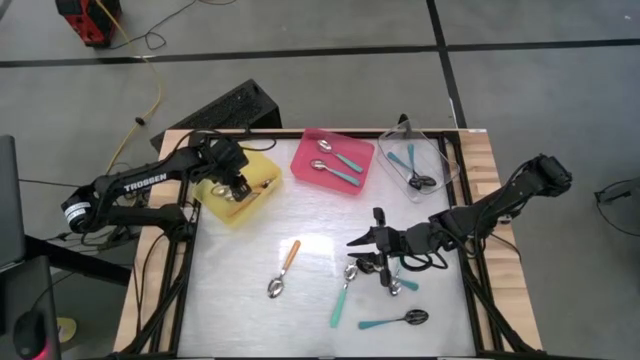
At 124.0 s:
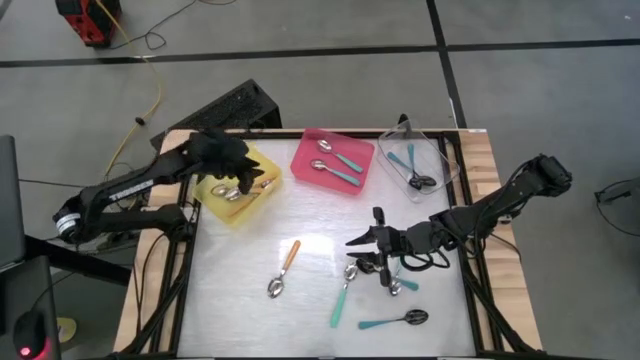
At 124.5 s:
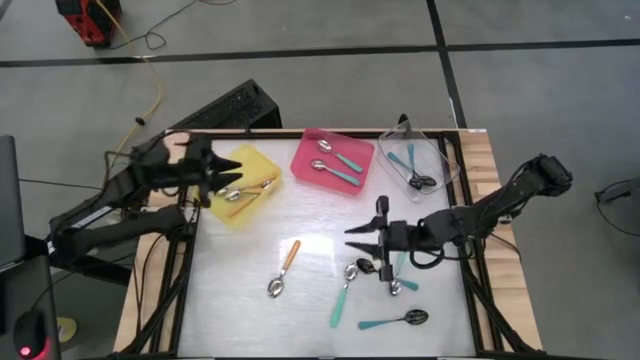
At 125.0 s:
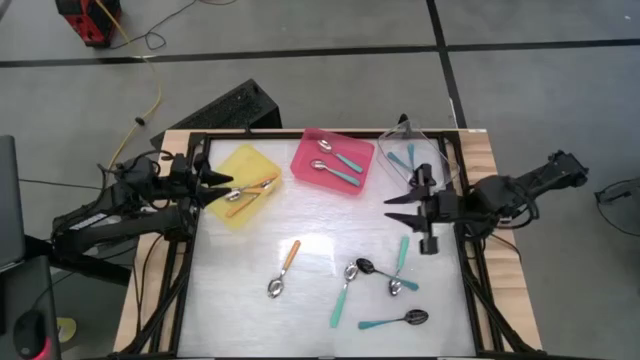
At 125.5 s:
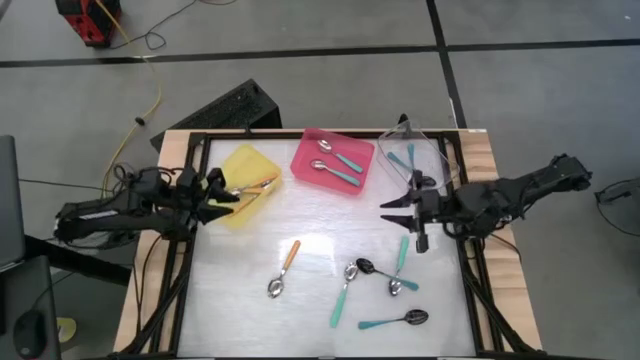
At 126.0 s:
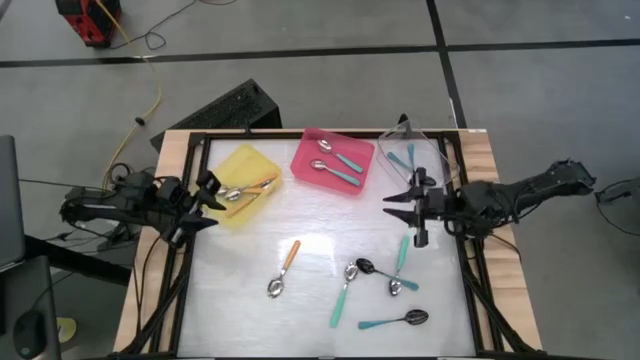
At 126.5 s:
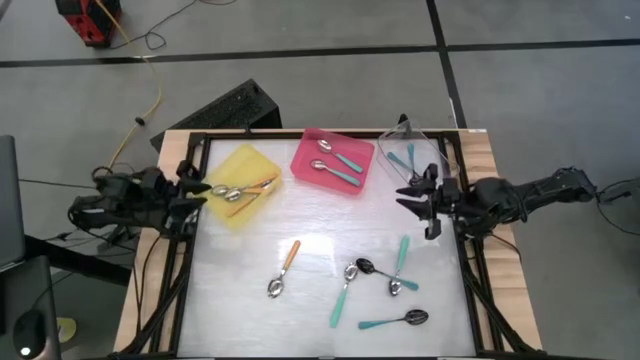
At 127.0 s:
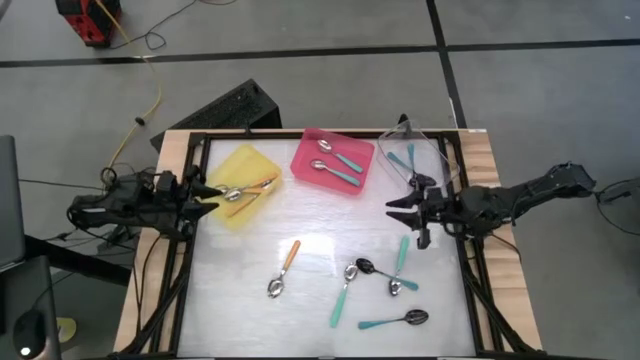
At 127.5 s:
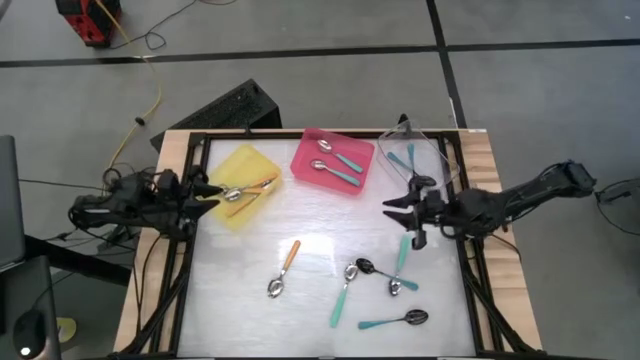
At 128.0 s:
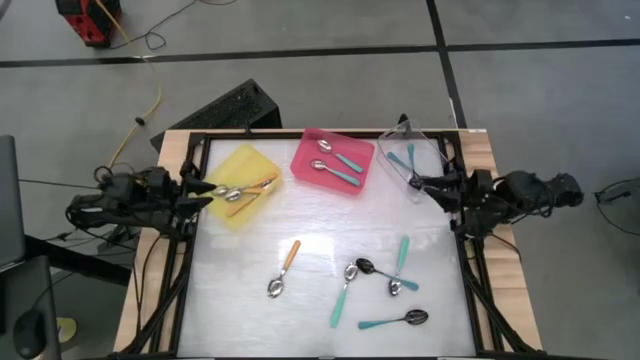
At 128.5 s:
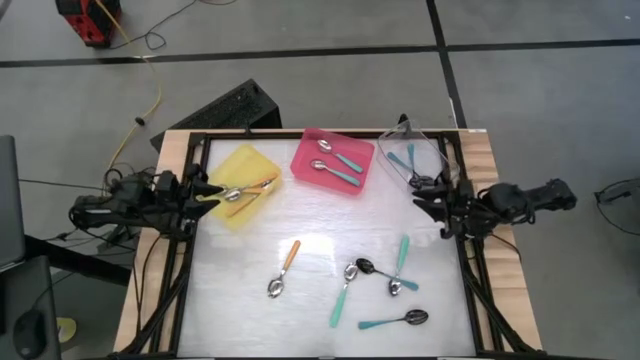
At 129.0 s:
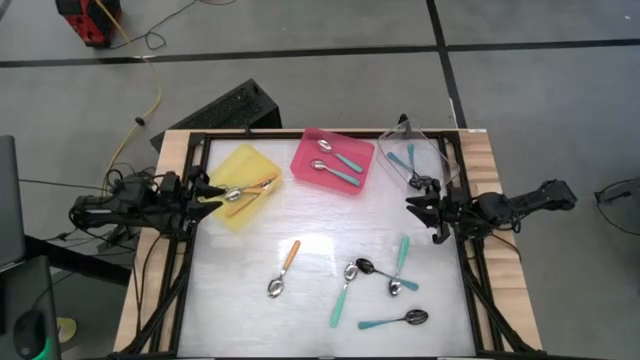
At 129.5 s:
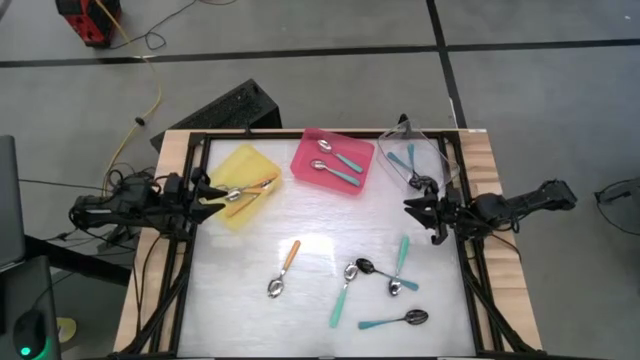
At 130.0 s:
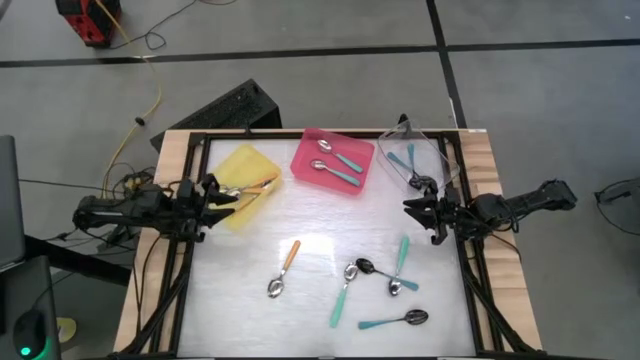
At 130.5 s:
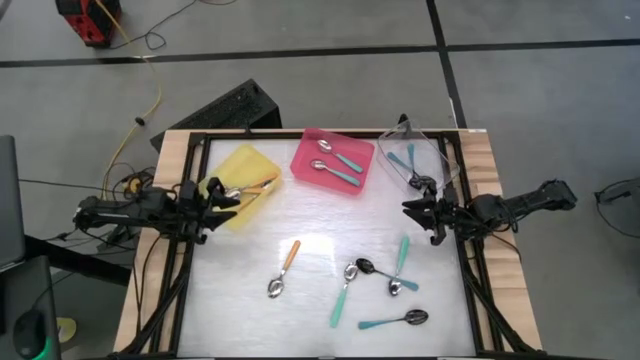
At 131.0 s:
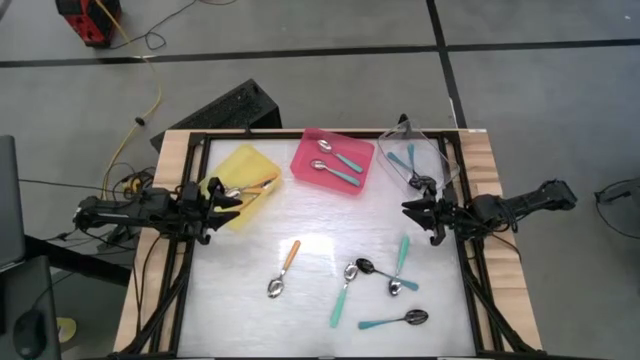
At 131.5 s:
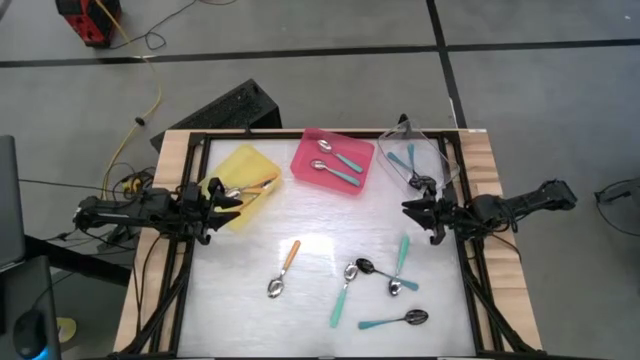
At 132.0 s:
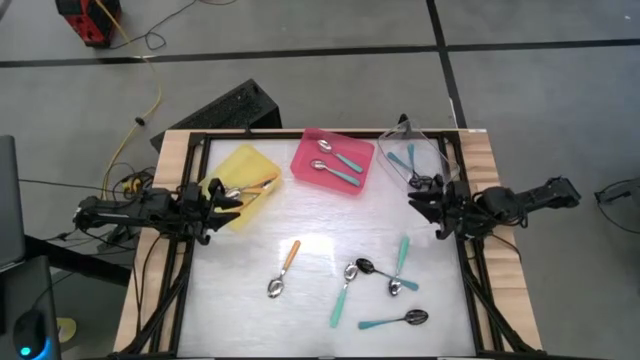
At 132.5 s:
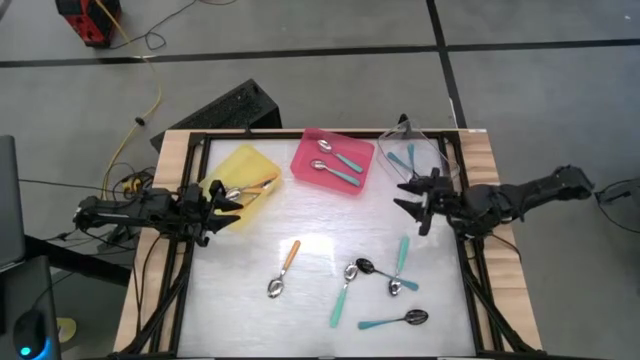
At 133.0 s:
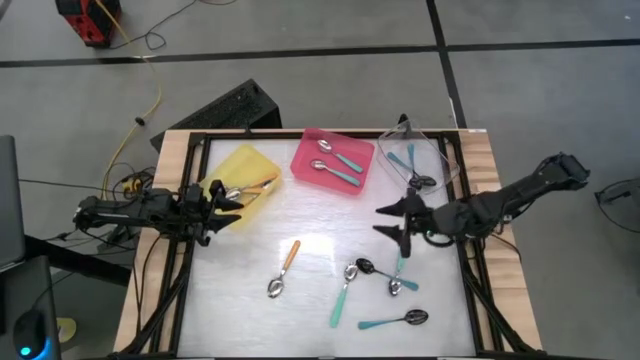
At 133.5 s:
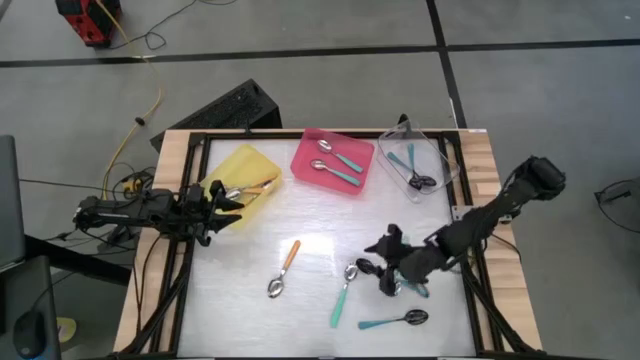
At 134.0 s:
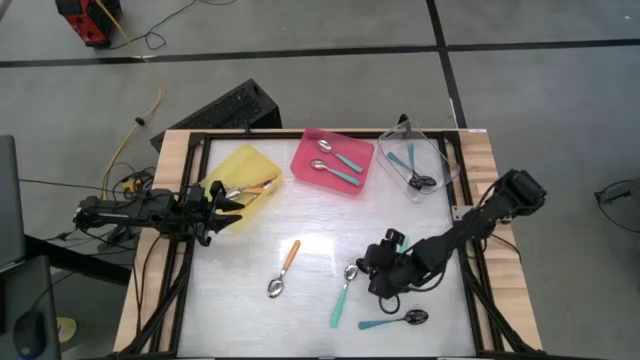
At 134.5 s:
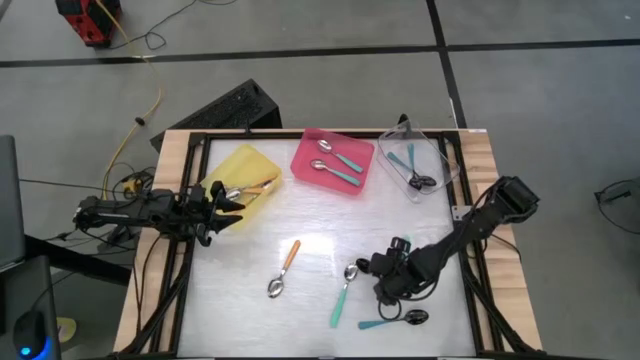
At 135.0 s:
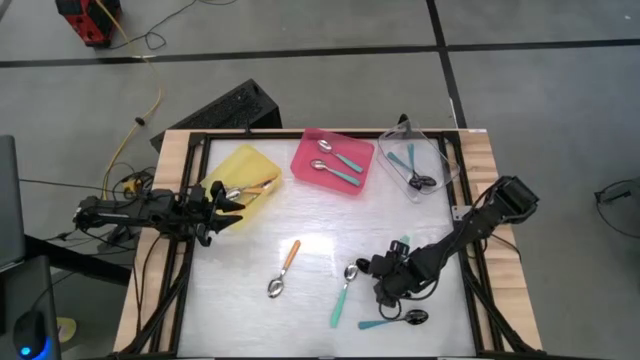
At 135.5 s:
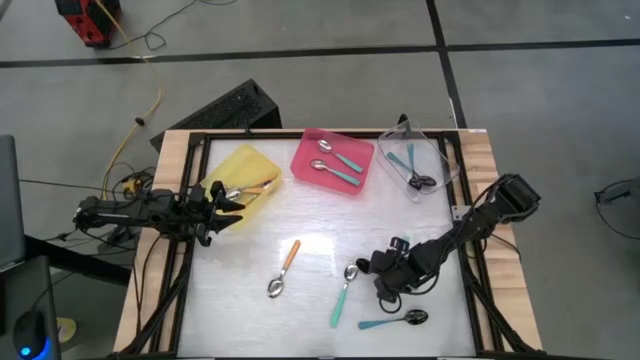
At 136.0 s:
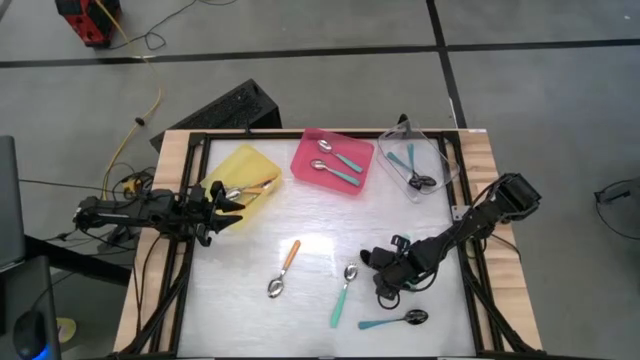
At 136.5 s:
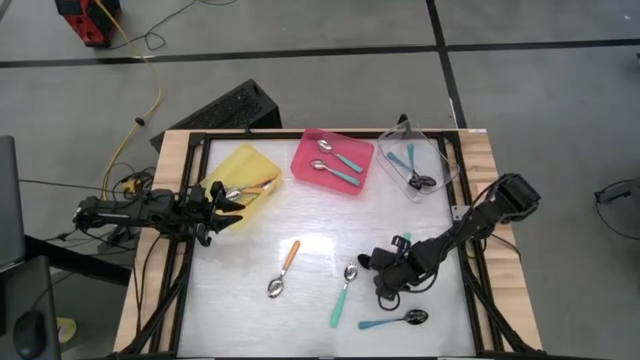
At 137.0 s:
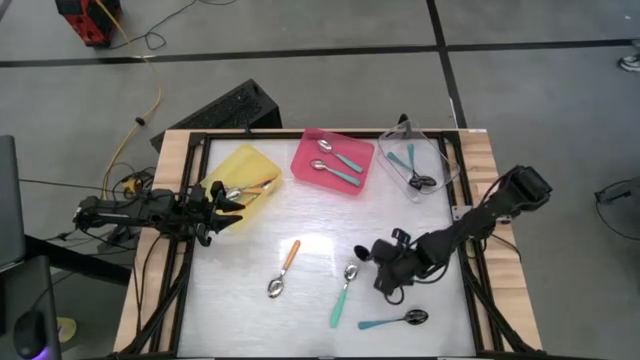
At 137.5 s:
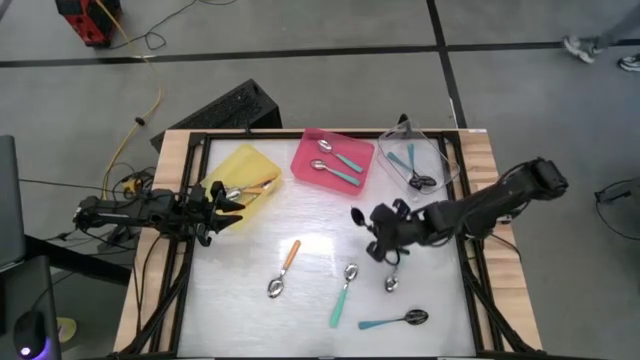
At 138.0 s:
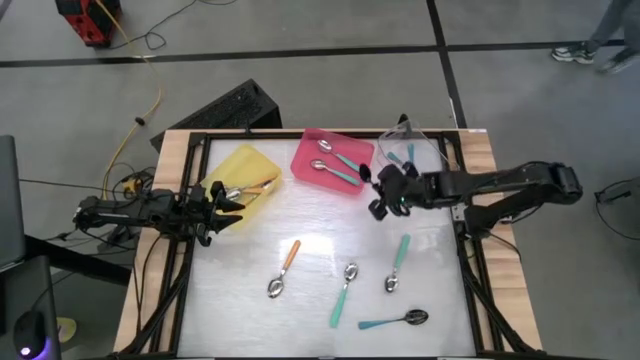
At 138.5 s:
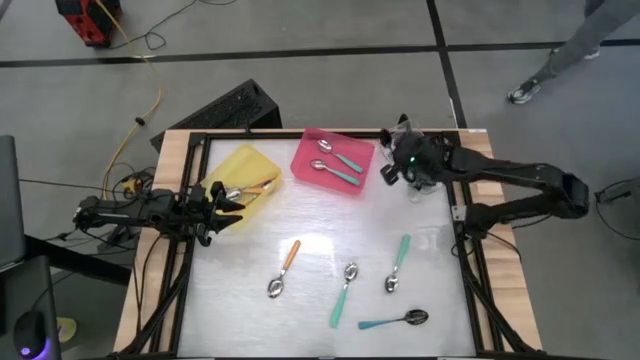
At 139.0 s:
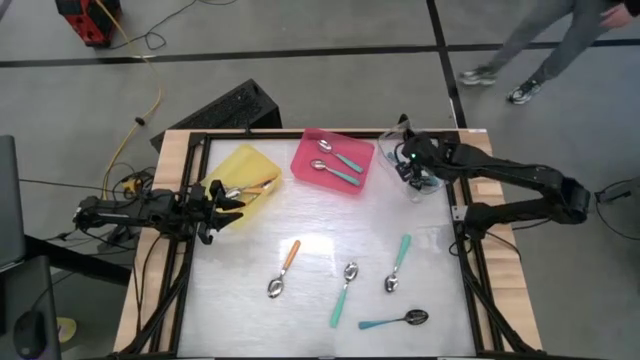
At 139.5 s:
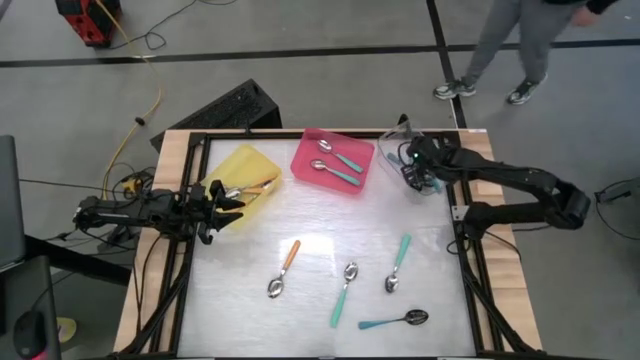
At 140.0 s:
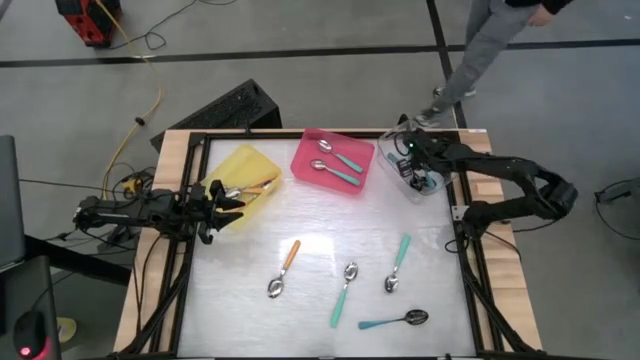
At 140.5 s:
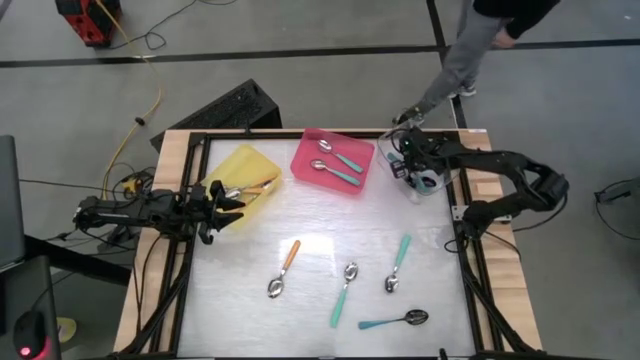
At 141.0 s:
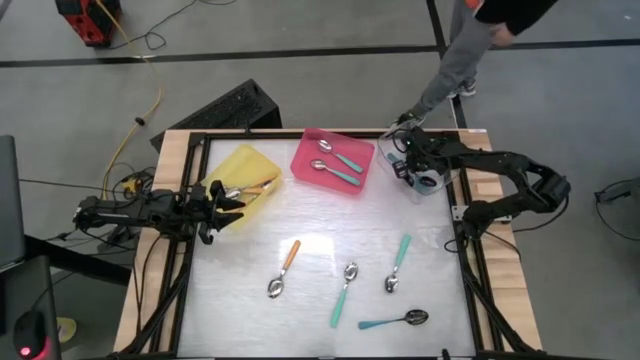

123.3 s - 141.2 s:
Task: Sort silverware by color (type)
Put the blue spoon into the transparent bin

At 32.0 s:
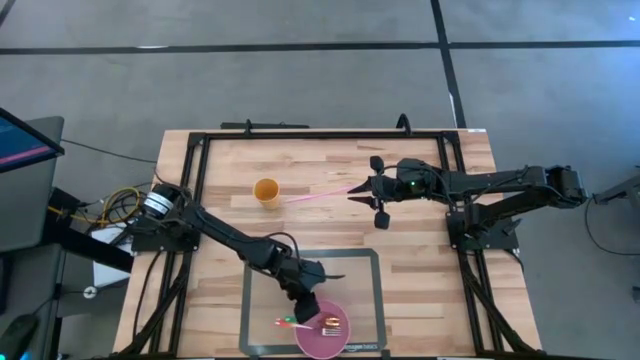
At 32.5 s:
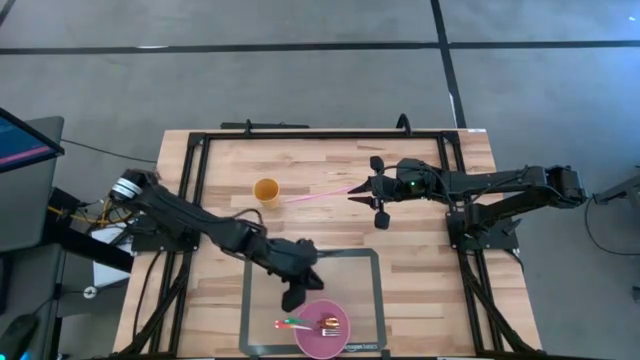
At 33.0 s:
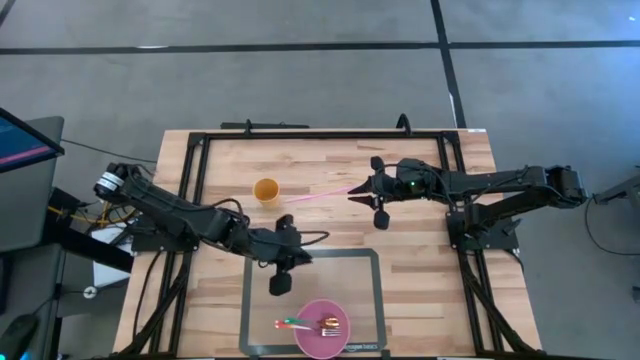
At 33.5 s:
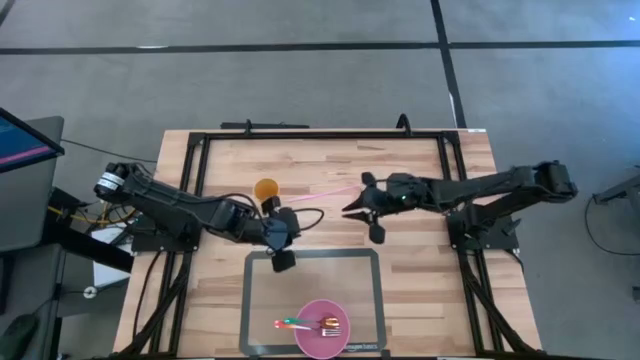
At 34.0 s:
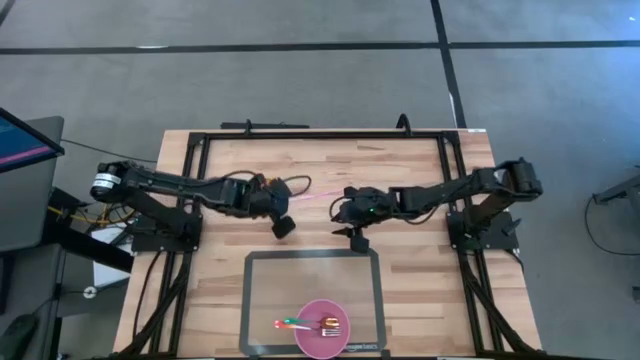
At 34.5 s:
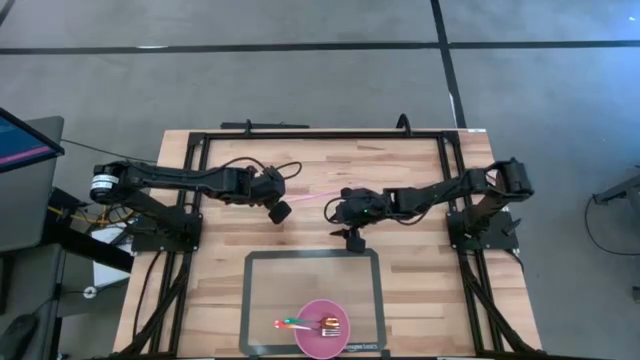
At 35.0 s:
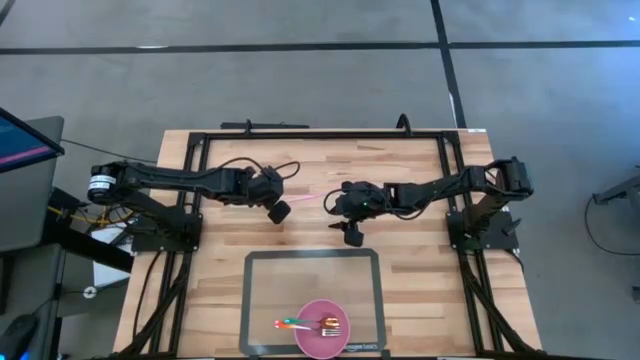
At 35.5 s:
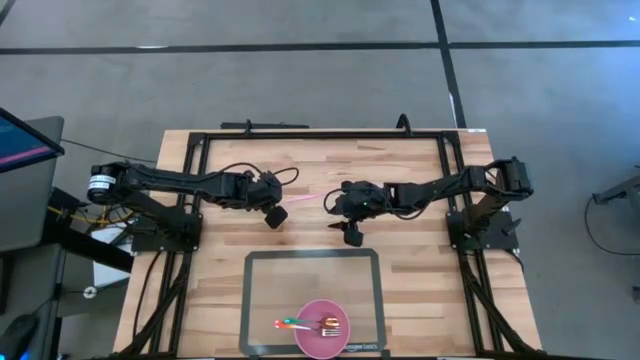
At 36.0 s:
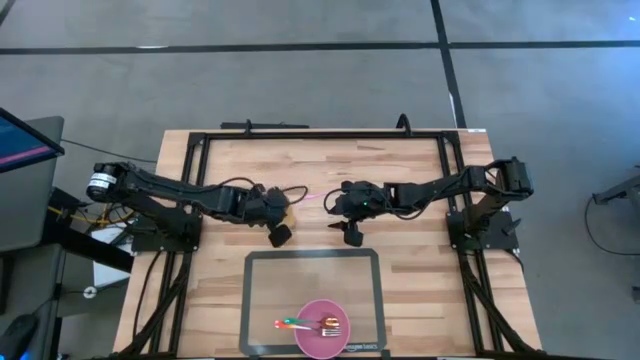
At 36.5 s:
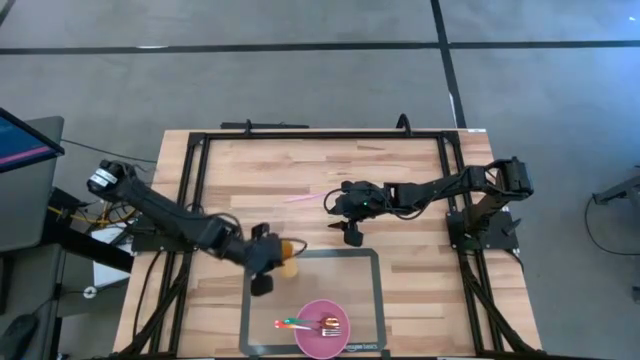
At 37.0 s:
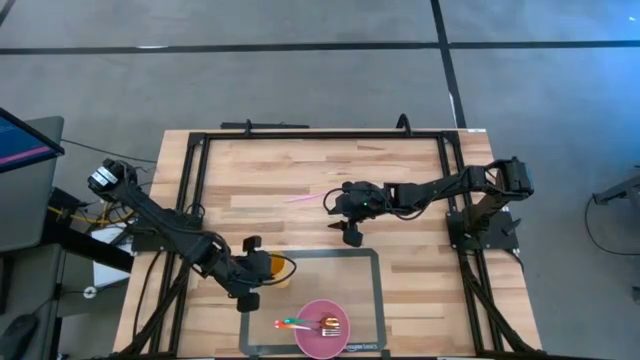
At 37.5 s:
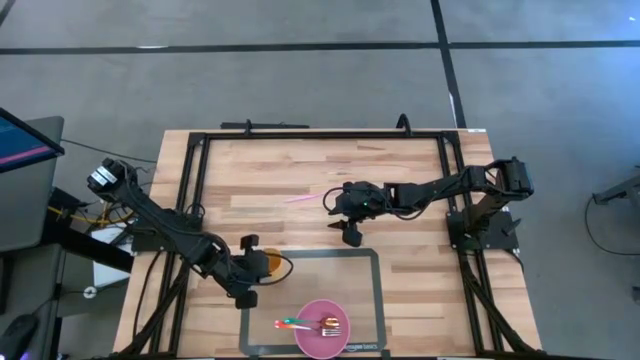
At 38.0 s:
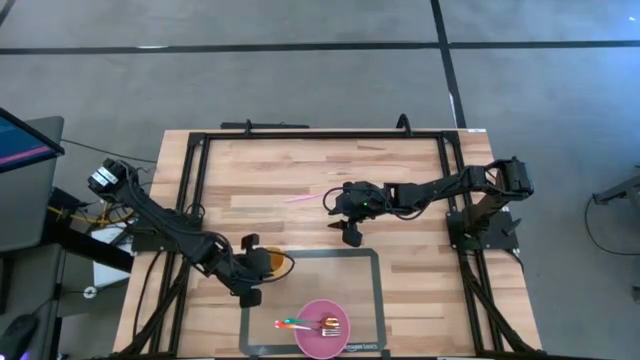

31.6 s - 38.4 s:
Task: Pick & Place Utensil
Put the yellow cup to the top left of the pink bowl on the transparent mat
